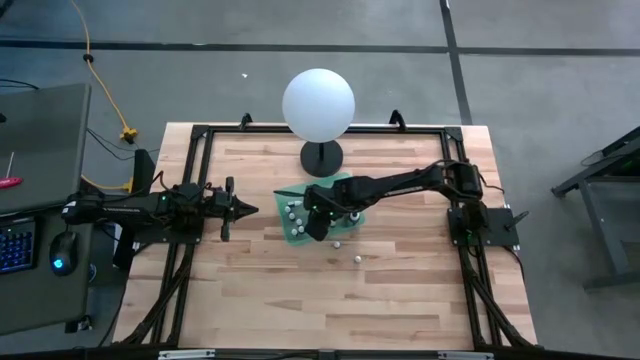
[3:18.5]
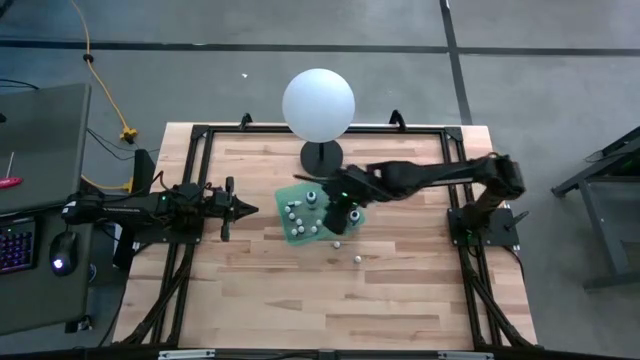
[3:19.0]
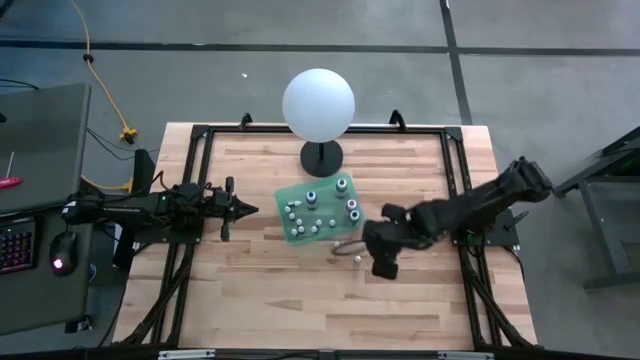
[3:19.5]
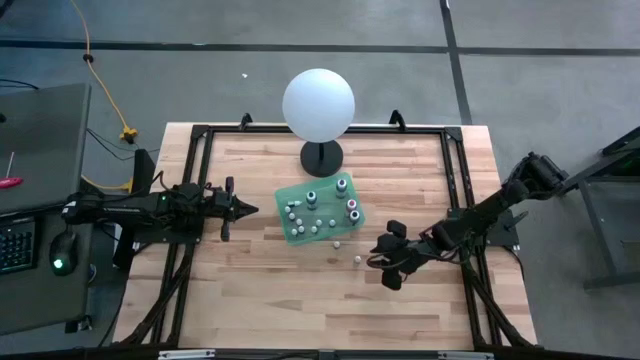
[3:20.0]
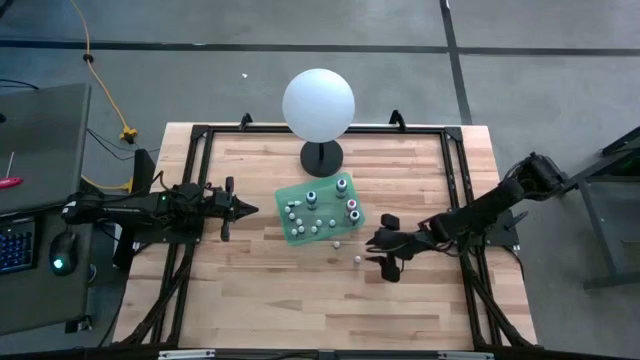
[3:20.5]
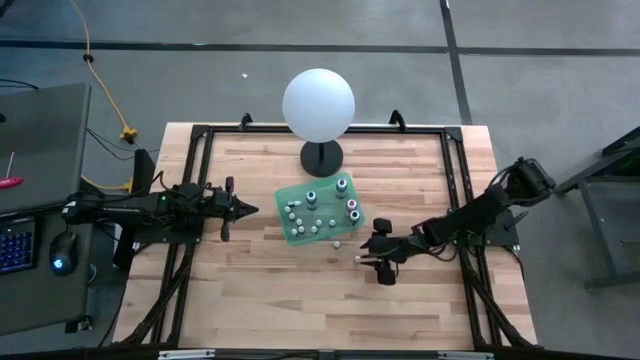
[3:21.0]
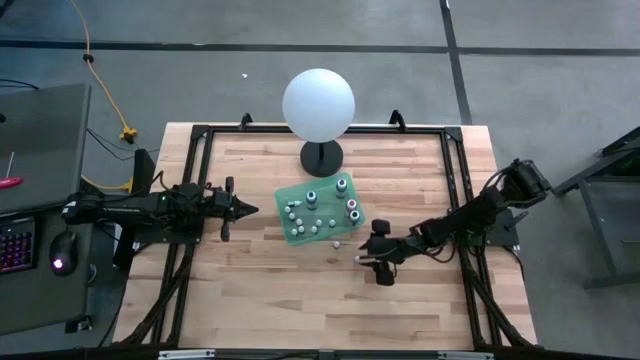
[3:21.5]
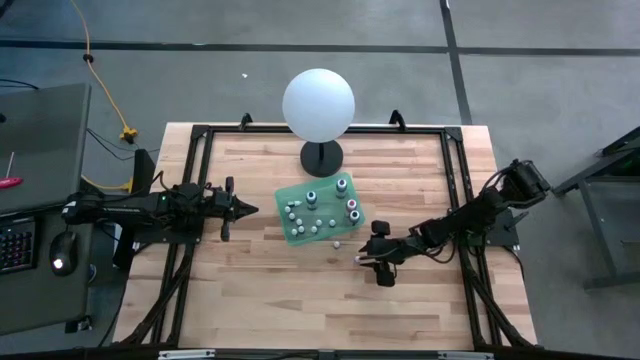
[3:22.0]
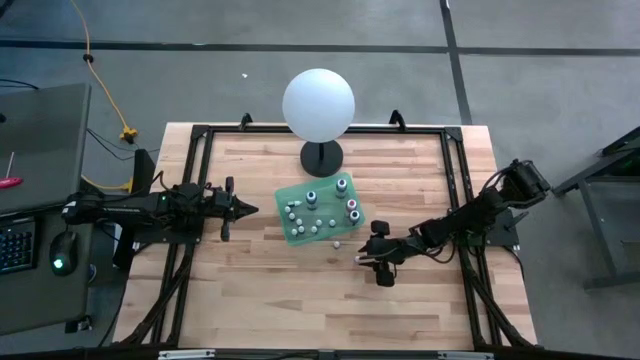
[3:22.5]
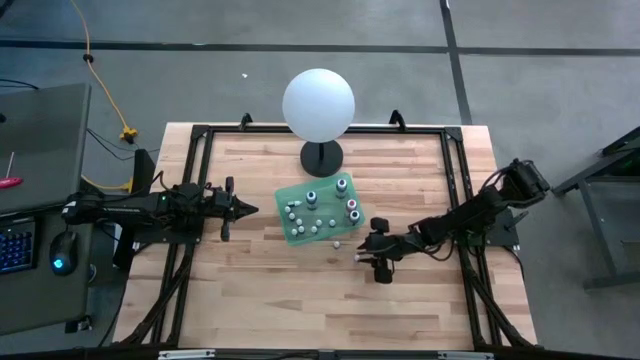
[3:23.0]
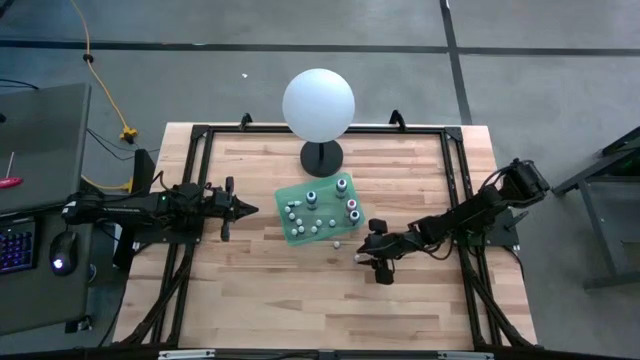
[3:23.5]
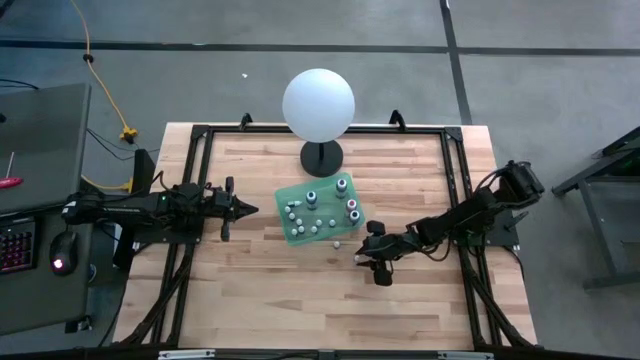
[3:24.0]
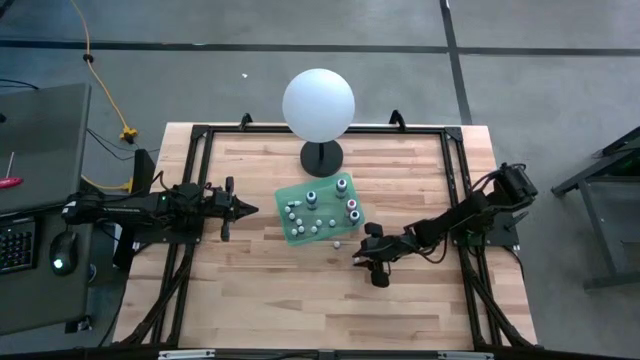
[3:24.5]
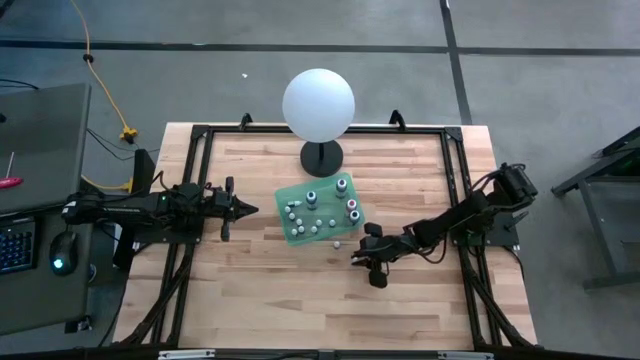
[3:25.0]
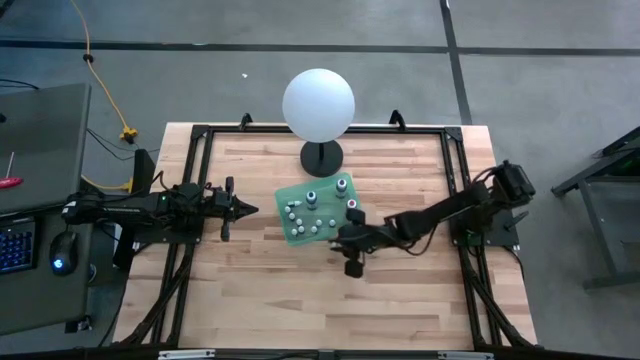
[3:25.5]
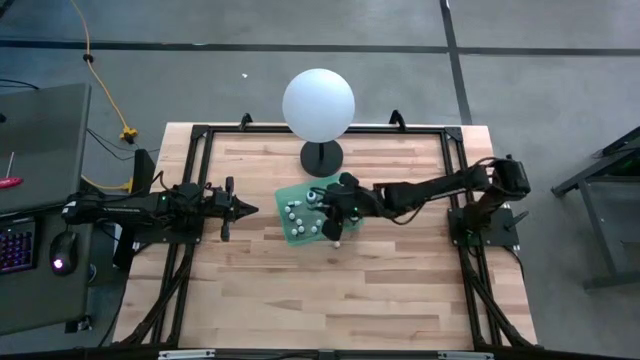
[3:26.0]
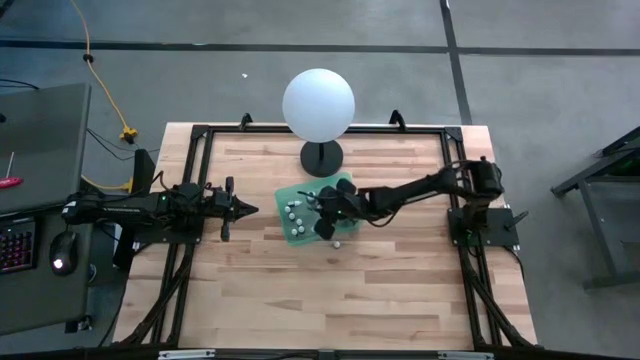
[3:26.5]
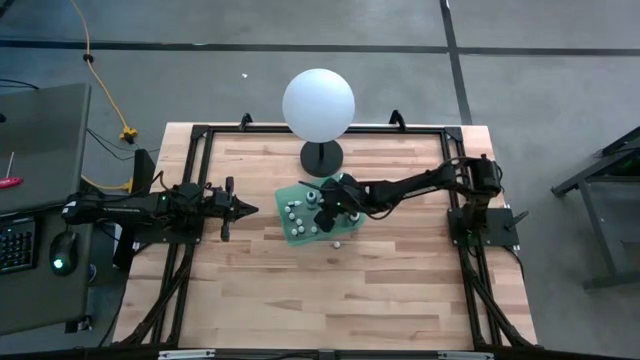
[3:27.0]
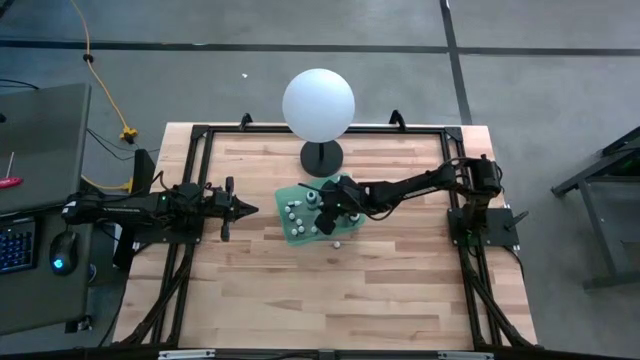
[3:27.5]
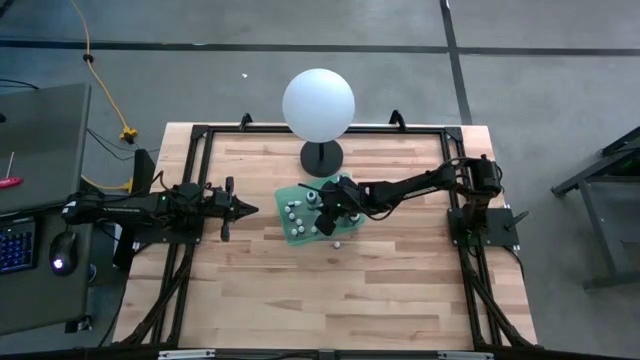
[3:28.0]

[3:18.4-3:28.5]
Task: Pick & Place food coloring
Put the bottom small red food coloring bottle into the bin

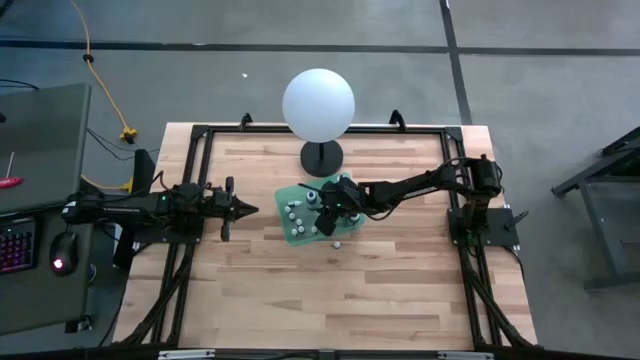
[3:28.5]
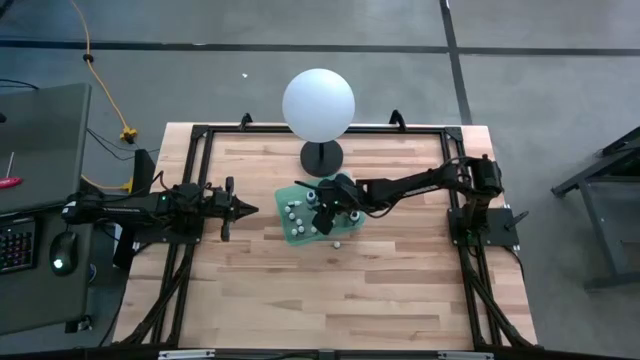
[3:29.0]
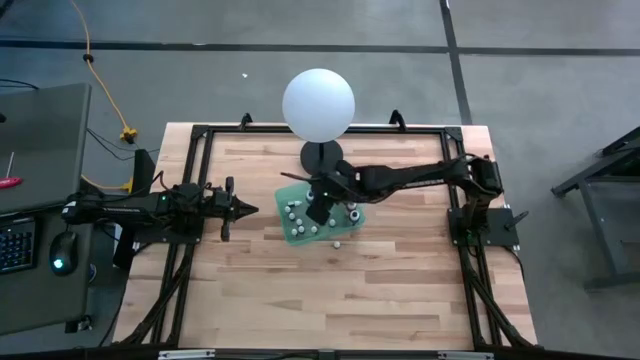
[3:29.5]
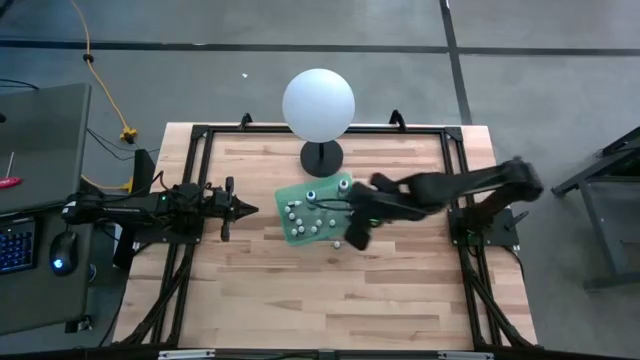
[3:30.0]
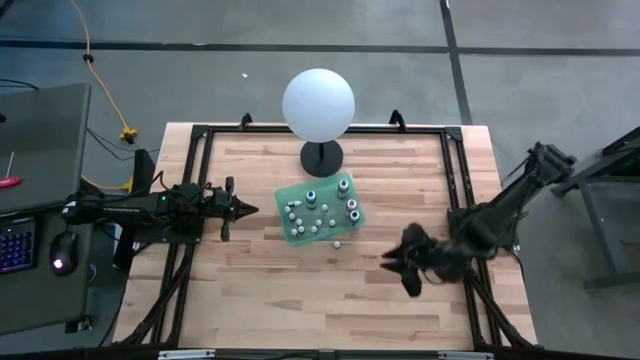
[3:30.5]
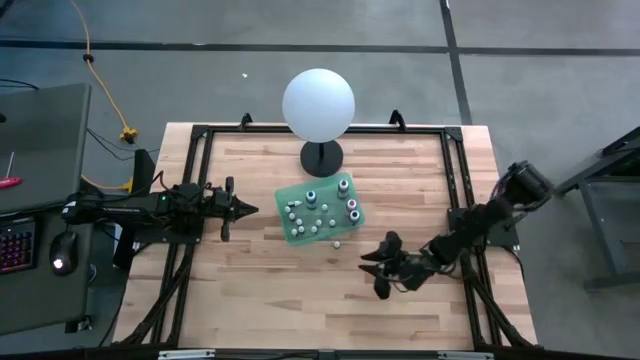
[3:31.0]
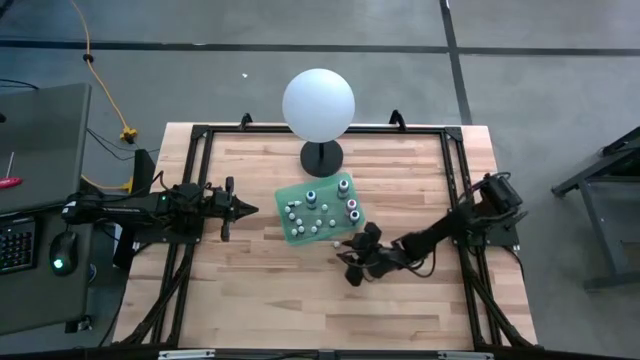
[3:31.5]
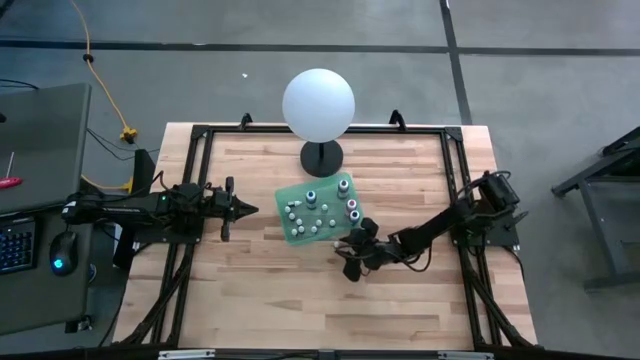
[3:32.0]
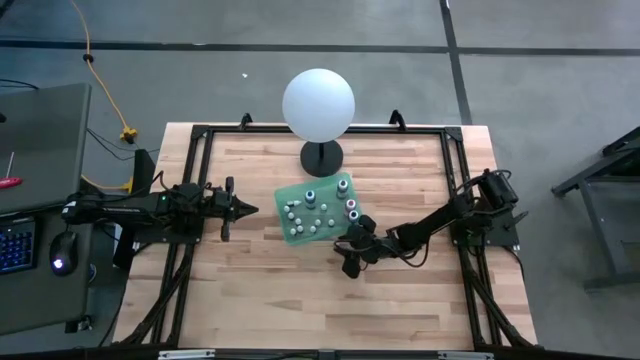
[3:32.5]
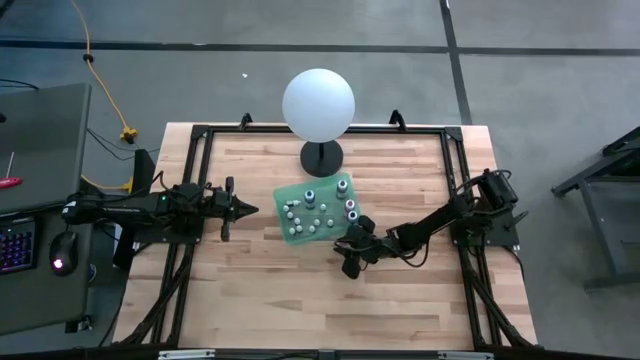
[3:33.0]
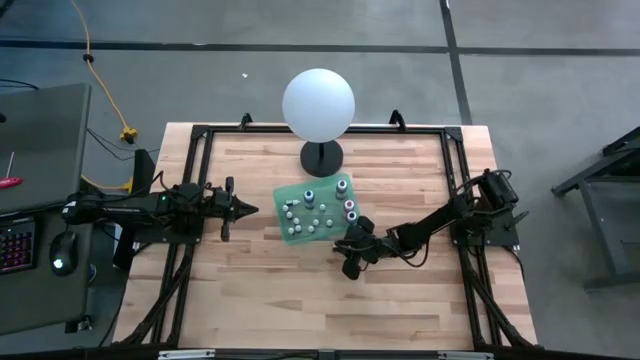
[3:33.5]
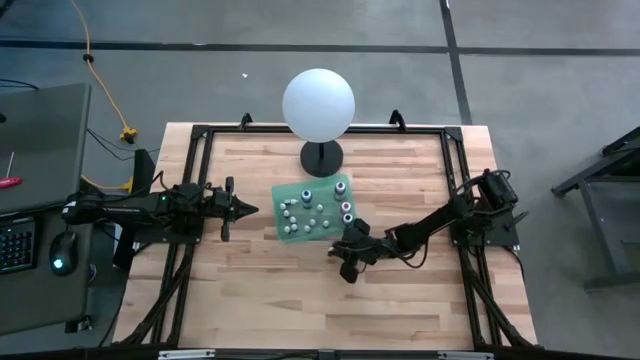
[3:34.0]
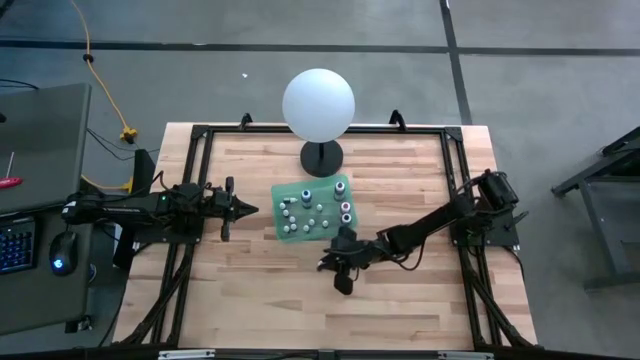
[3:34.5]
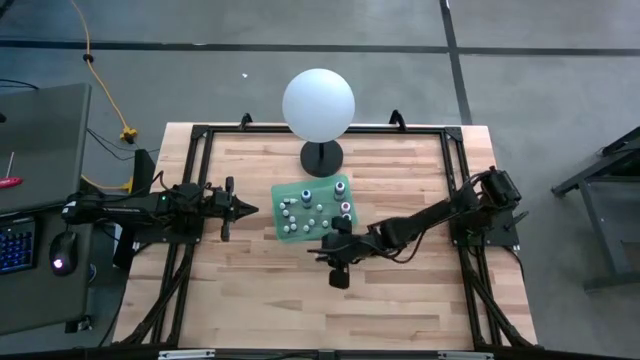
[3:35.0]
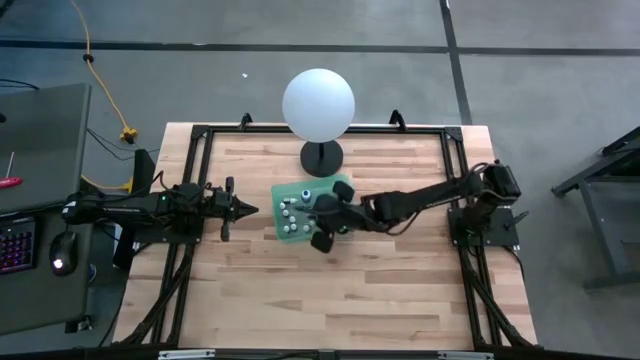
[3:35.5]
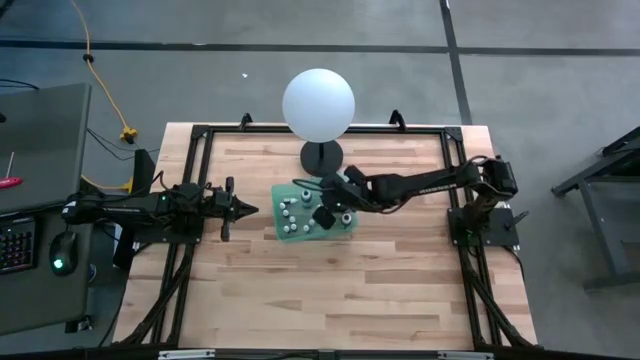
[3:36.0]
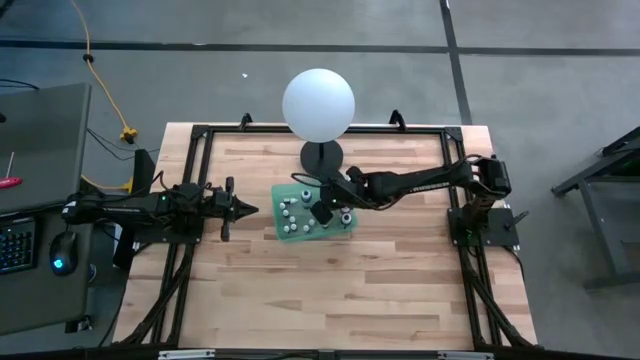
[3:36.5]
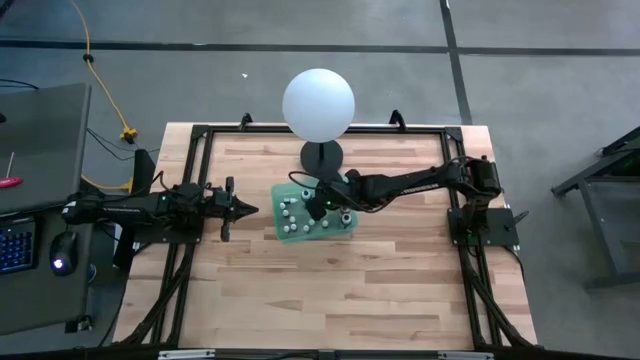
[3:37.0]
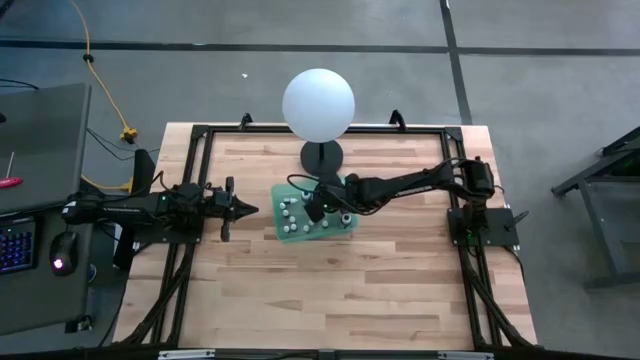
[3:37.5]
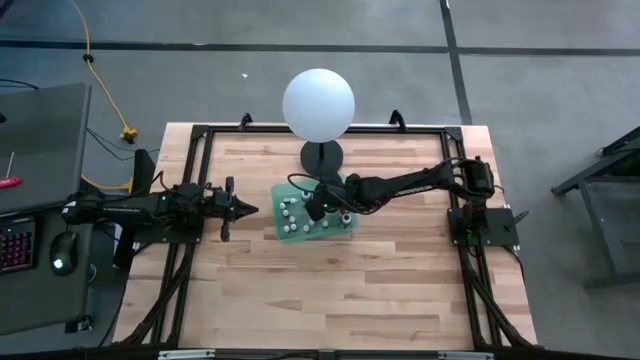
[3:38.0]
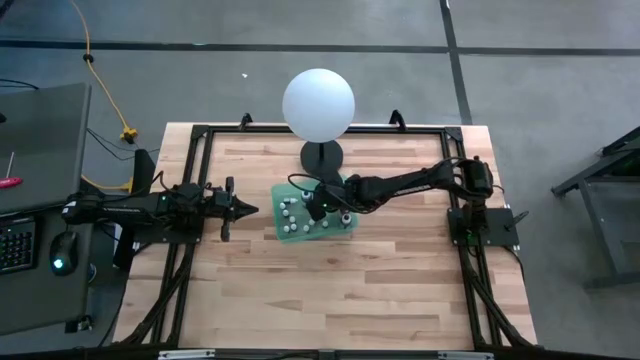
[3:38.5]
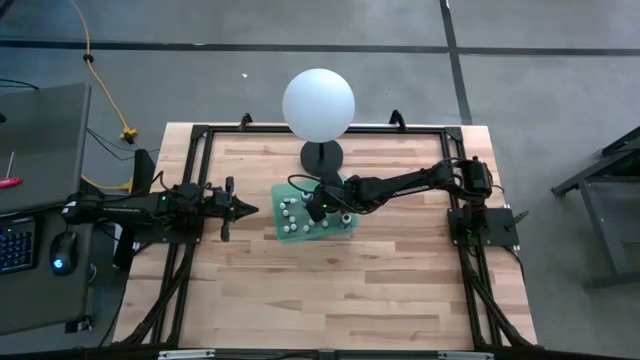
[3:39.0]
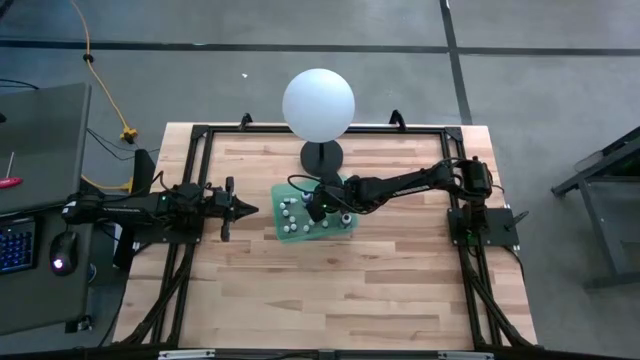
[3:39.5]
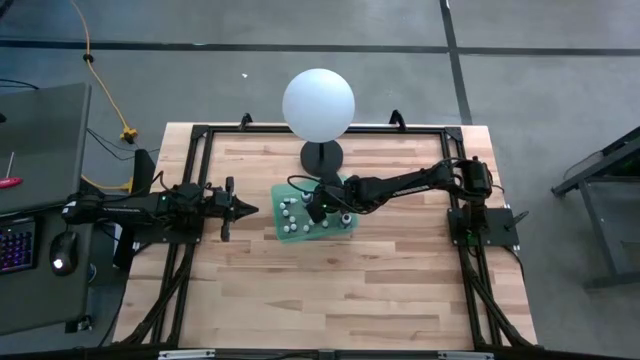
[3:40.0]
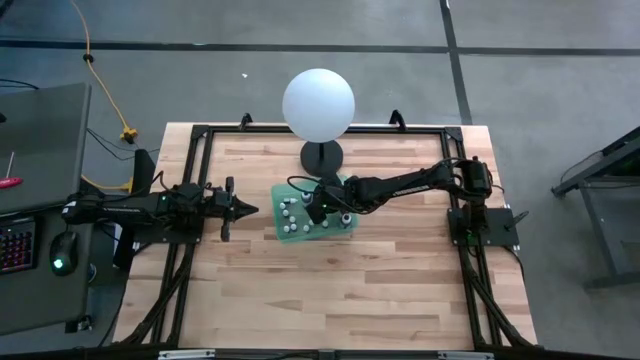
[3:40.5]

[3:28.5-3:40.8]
Put the small red food coloring bottle into the bin
